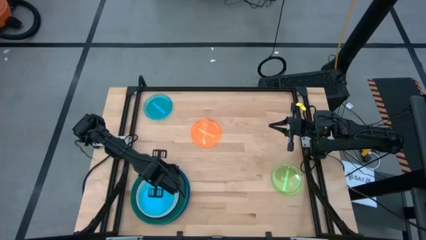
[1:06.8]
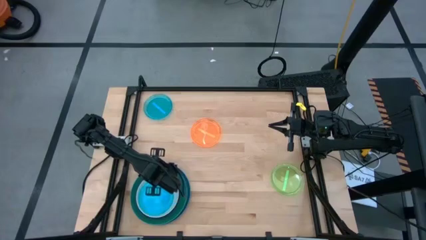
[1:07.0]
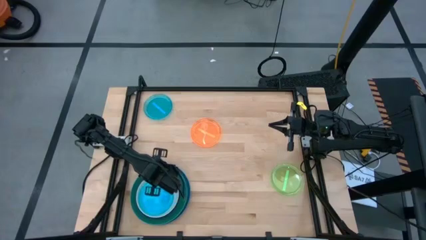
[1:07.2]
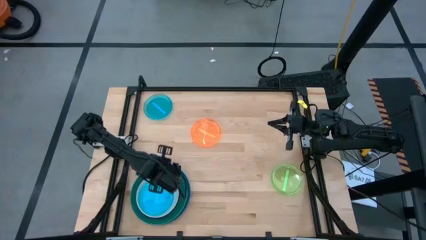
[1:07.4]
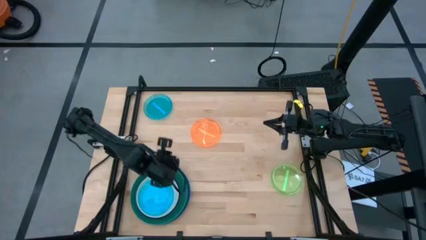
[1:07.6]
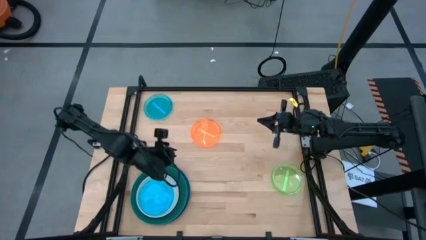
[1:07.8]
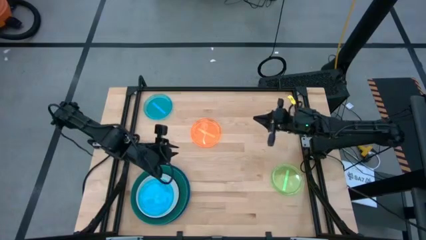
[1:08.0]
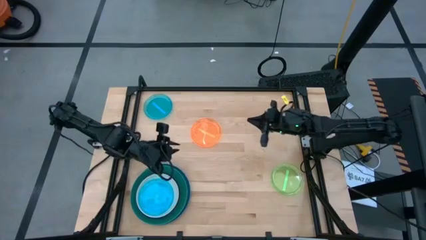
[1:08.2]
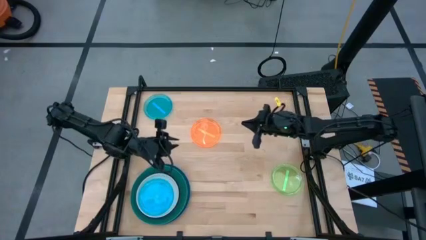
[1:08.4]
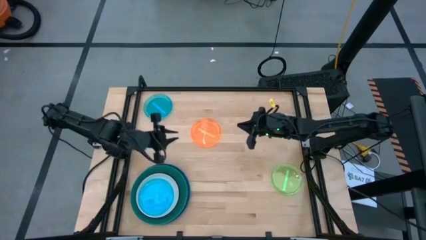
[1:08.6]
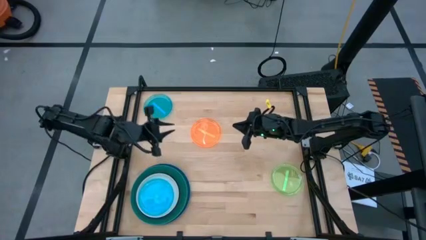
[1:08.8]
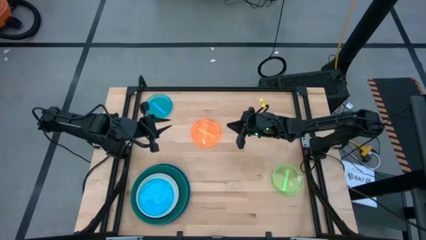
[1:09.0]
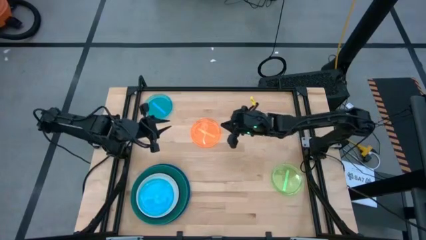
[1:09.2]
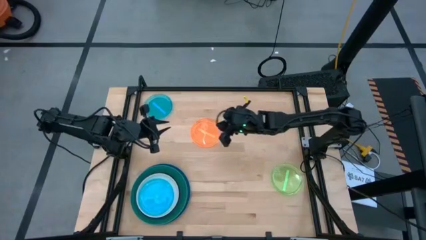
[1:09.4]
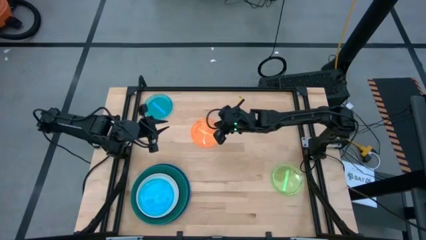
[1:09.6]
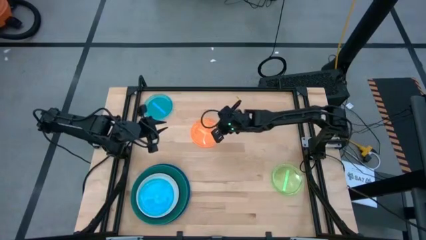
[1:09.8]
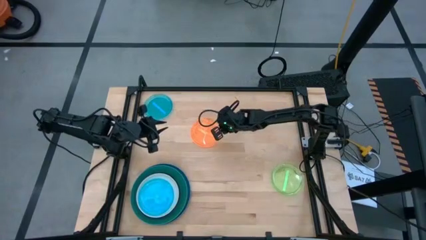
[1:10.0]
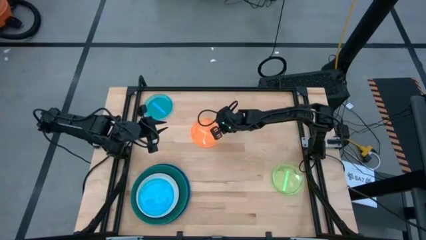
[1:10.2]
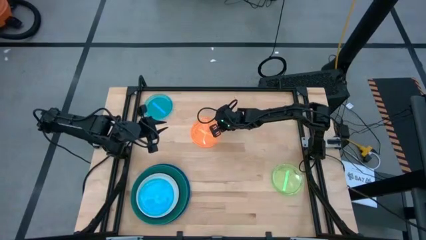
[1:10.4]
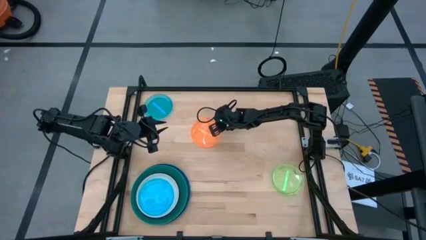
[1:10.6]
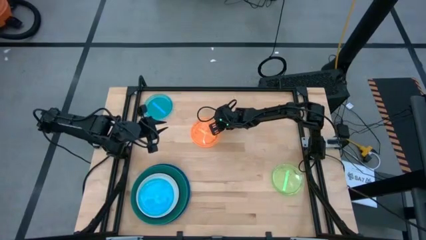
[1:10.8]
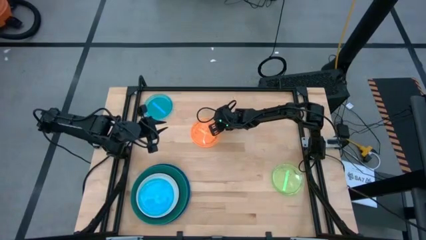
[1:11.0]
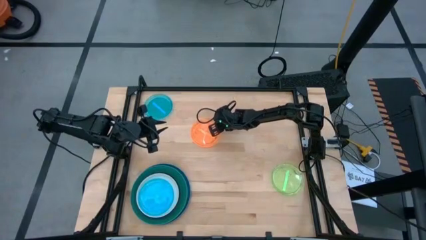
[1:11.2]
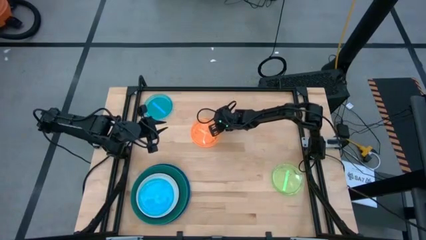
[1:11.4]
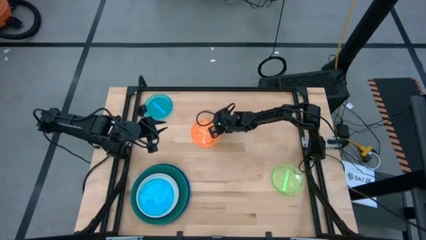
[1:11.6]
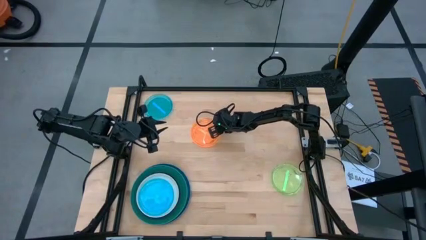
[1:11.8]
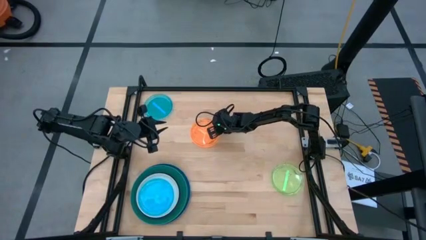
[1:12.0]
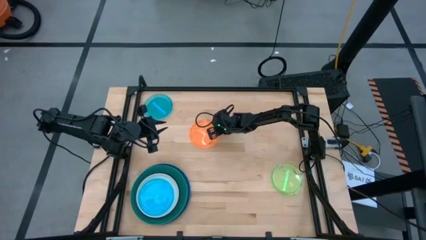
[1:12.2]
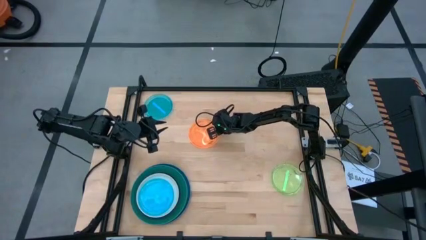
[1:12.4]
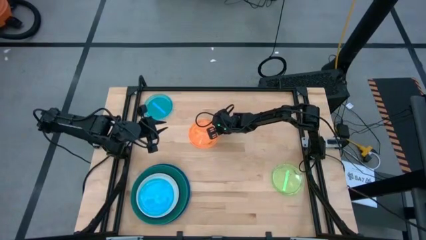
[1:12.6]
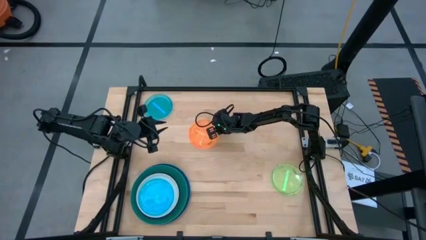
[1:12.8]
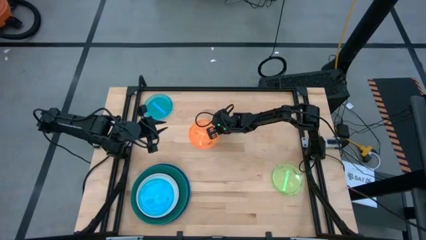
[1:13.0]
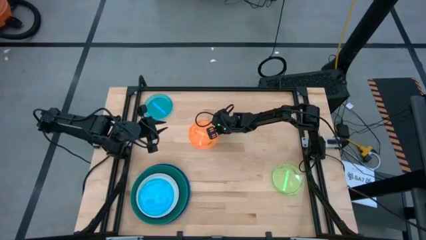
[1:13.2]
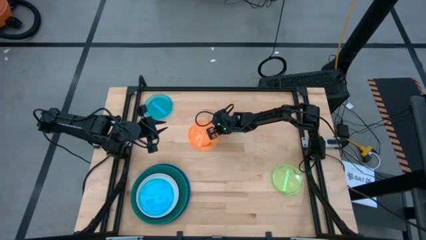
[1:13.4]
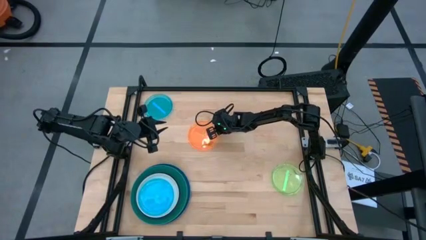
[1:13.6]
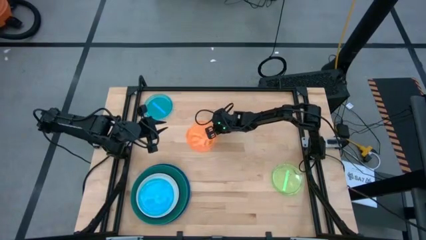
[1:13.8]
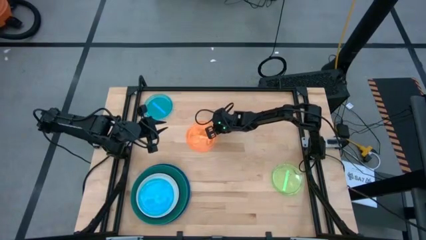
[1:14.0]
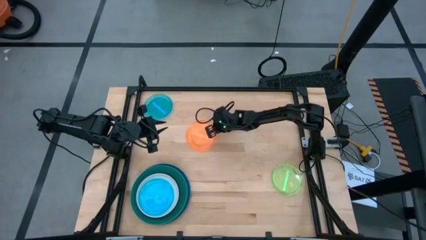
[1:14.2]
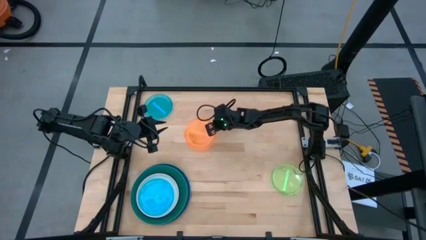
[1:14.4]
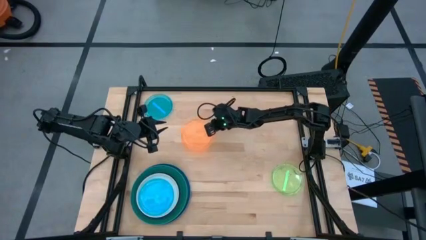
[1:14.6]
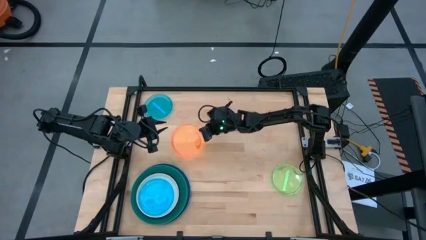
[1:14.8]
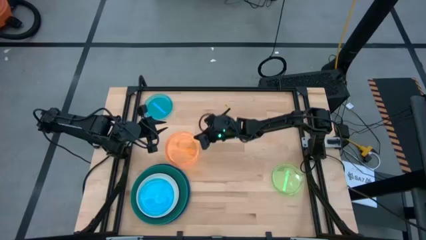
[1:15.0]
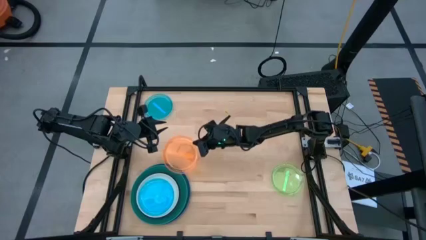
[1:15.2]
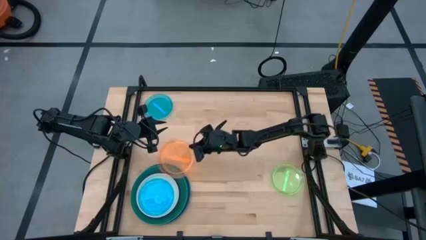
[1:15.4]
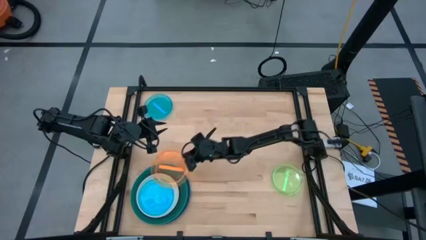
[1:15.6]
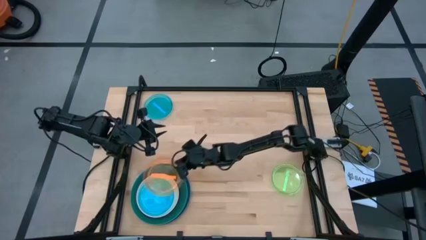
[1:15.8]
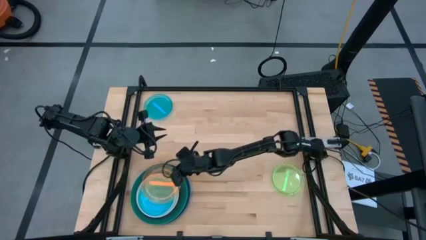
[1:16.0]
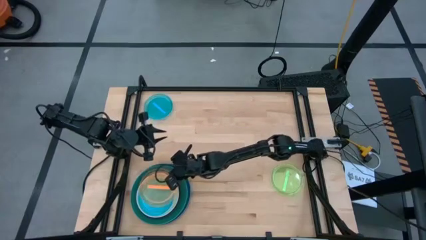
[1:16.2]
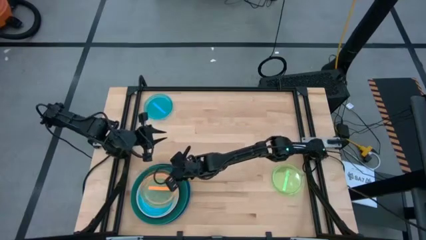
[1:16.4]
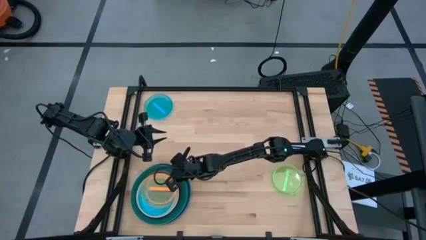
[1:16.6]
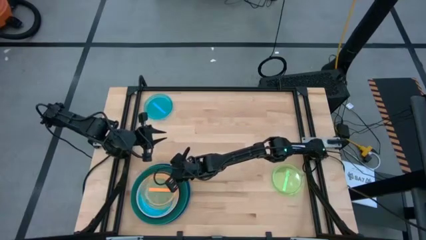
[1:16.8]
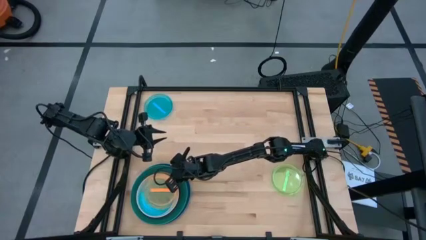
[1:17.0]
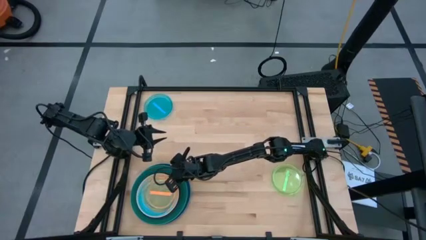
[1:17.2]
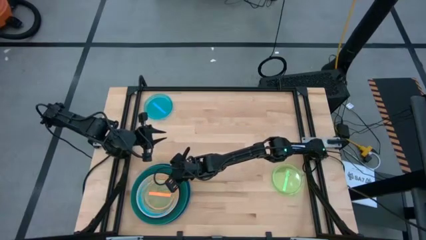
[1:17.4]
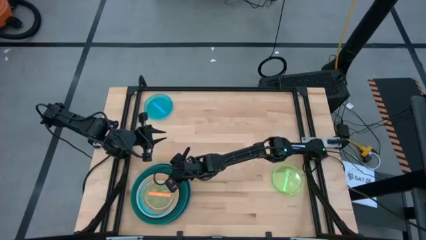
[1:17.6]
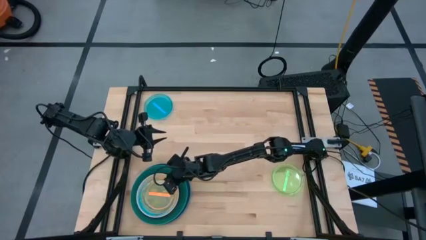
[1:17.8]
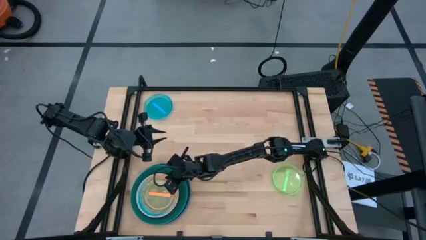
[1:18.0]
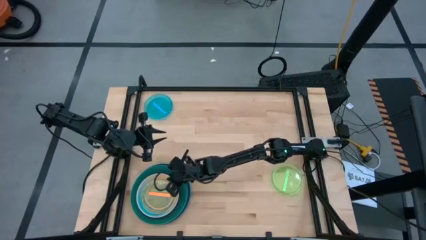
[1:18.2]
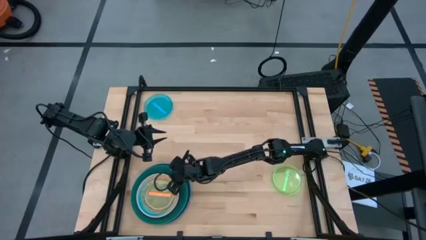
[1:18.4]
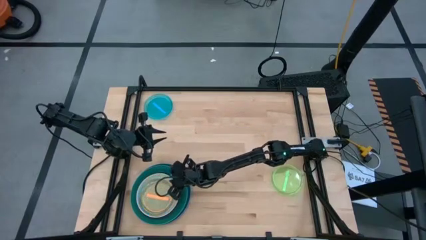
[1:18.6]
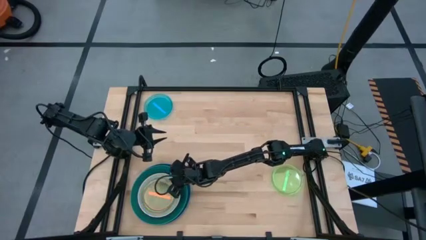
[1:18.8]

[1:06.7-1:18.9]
Task: Stack plastic plates
Stack the orange plate on top of the light blue plate

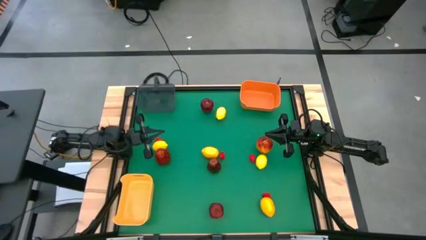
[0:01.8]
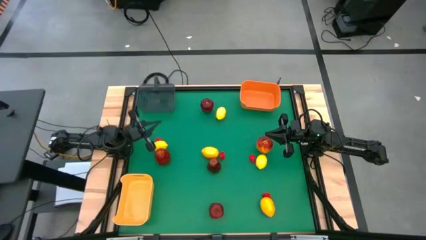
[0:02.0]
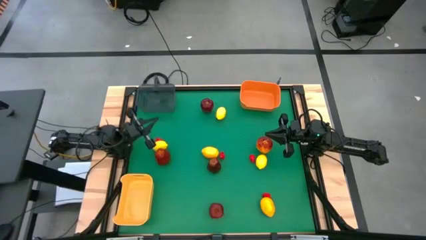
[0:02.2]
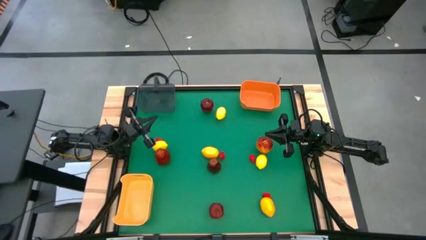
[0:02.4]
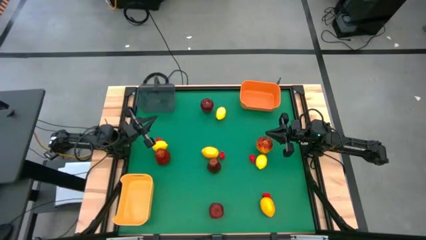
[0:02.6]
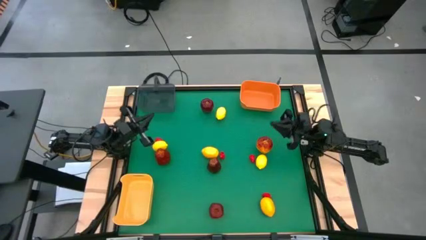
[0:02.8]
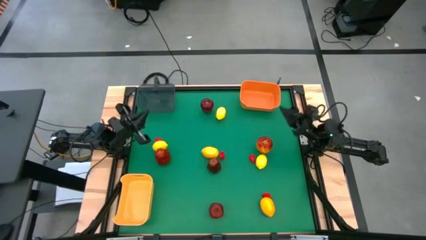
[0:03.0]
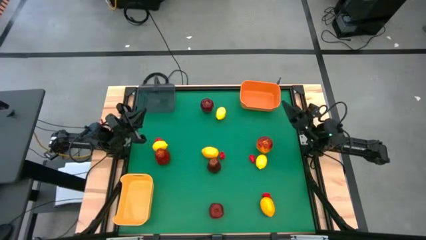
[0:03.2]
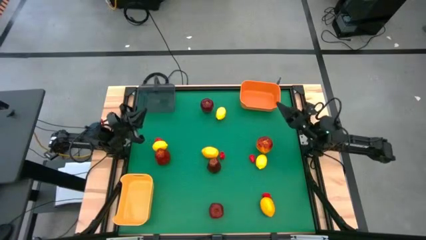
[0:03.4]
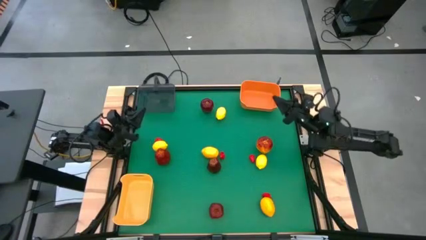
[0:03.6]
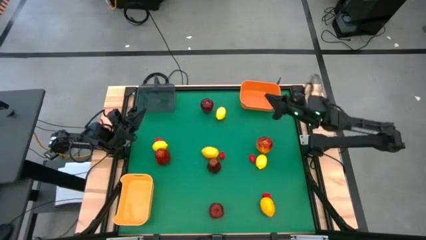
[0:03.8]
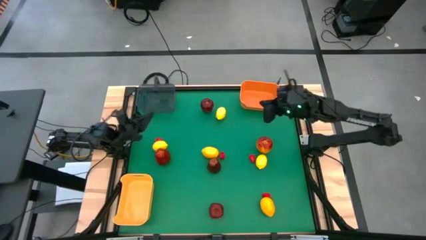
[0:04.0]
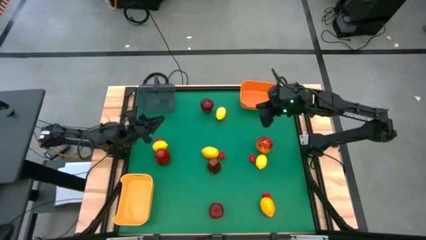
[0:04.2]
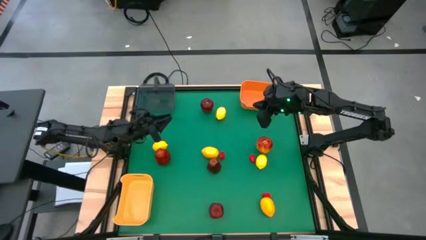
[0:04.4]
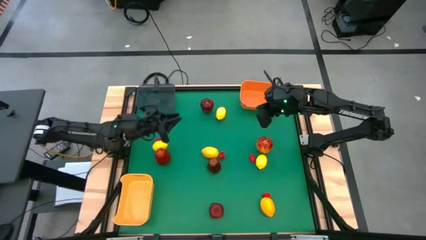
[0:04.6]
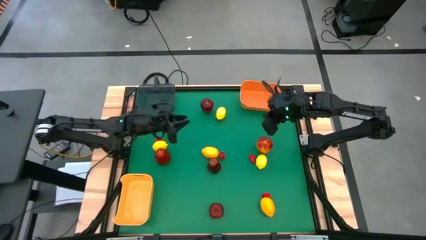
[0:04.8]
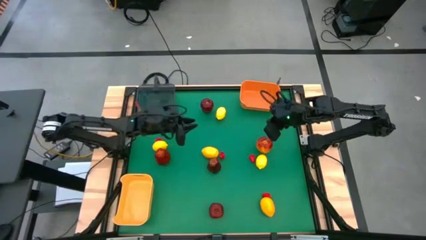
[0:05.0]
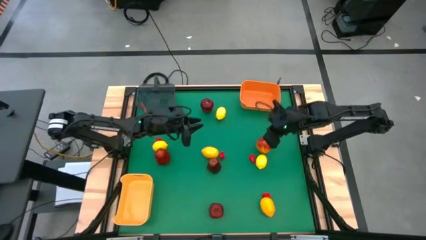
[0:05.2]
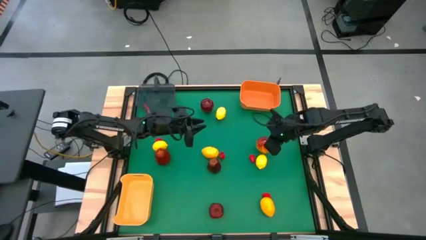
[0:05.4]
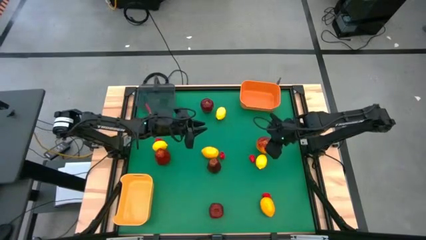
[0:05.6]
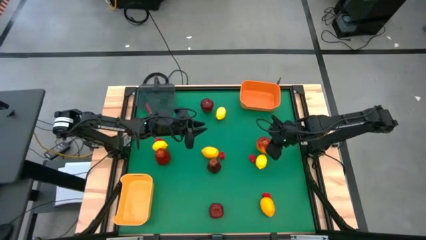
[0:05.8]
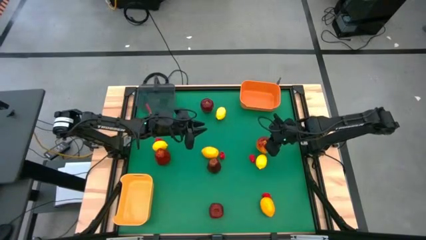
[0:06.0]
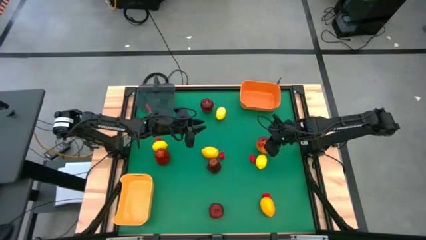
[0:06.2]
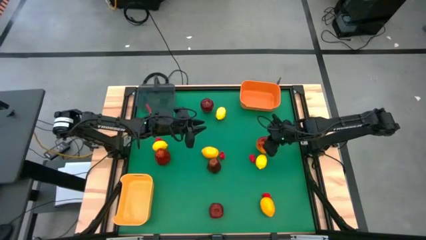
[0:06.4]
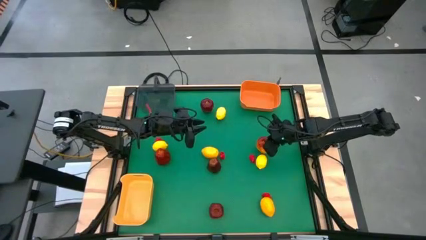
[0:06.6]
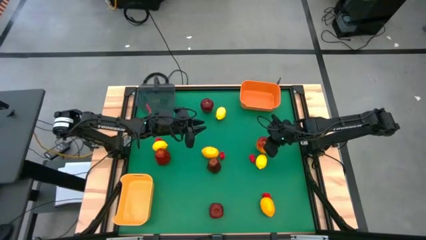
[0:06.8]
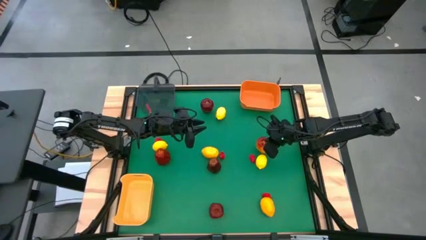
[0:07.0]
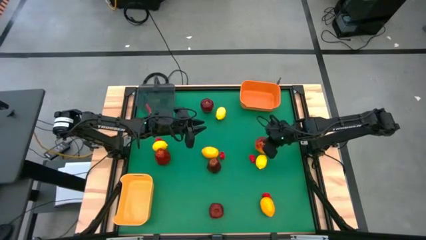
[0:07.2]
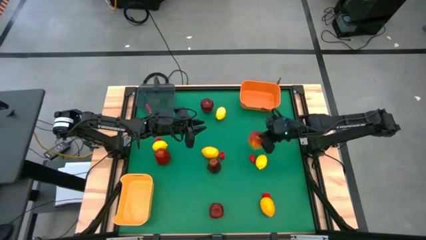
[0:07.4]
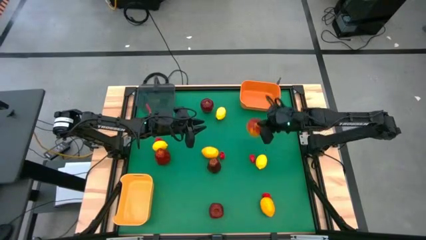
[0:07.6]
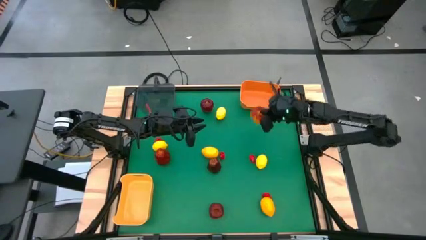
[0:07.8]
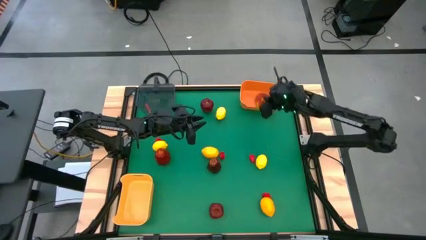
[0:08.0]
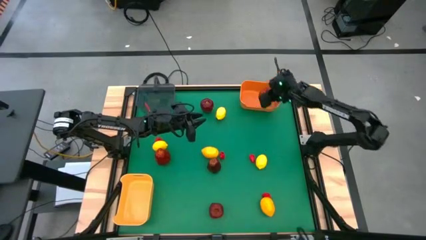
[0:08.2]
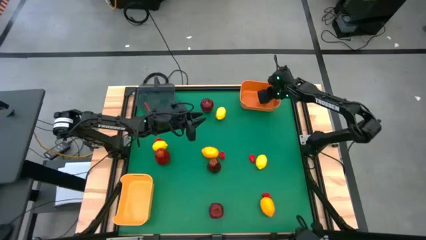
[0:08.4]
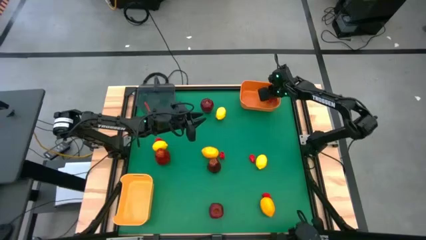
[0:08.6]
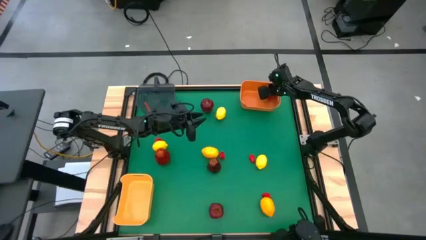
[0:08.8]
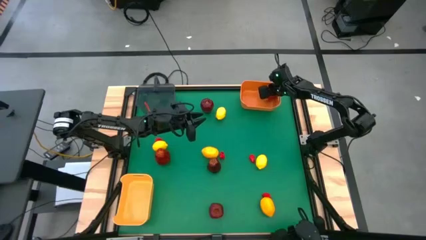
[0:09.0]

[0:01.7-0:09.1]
Task: Sort produce into baskets
Put the apple into the orange bin
